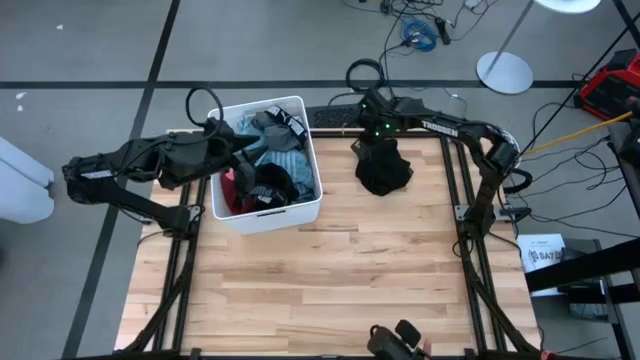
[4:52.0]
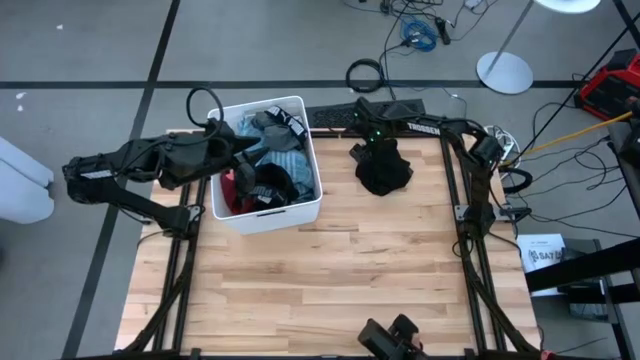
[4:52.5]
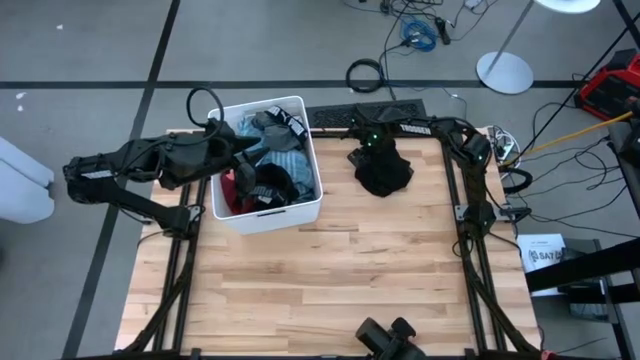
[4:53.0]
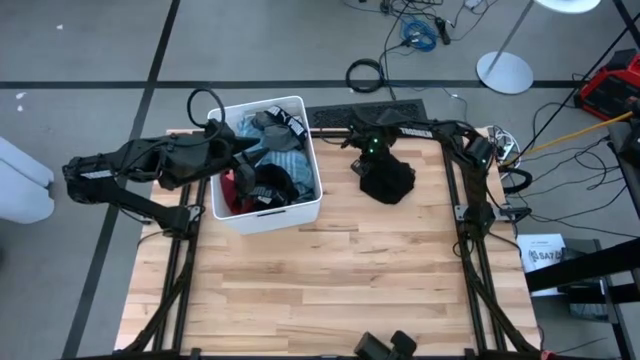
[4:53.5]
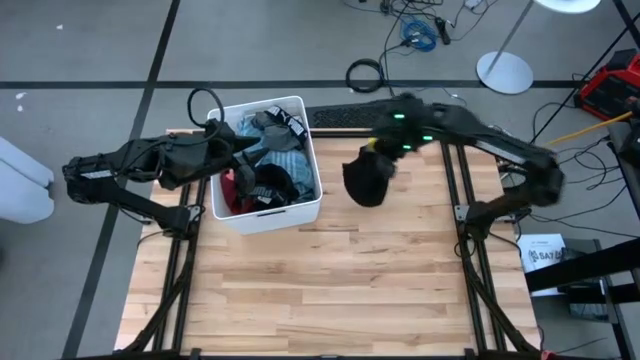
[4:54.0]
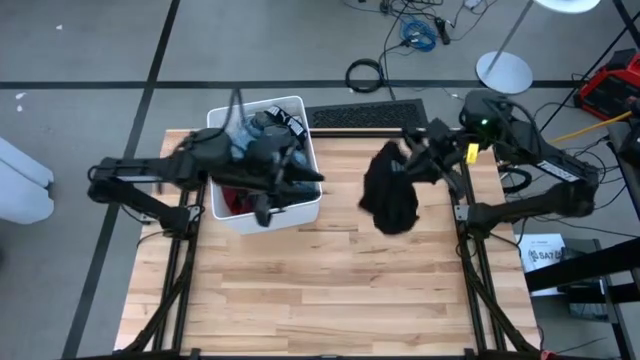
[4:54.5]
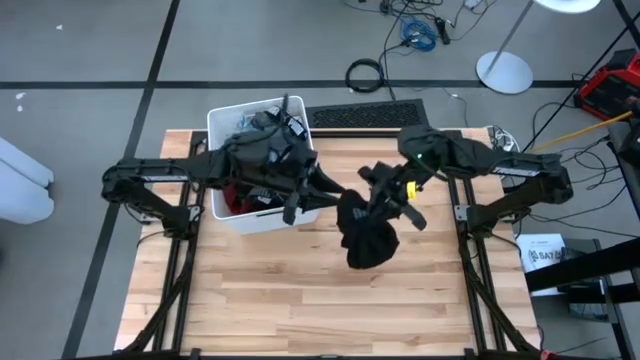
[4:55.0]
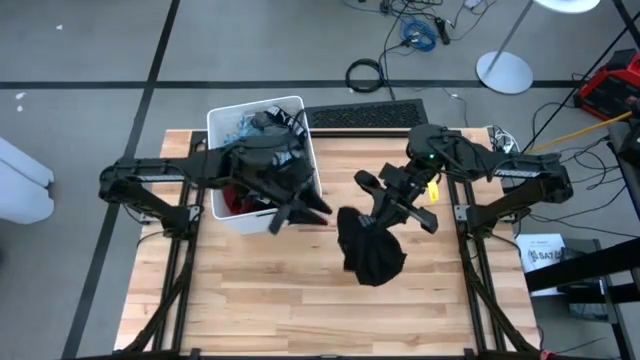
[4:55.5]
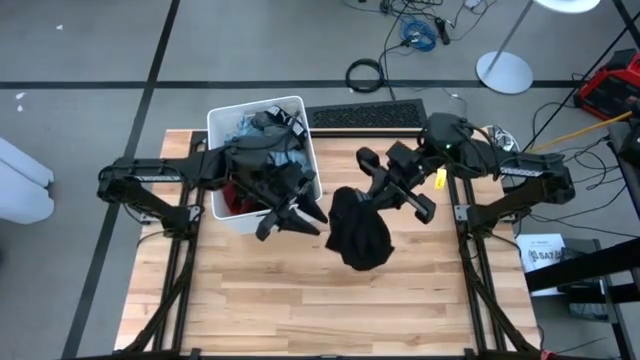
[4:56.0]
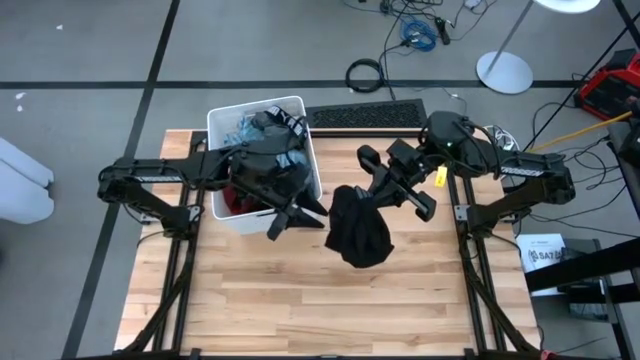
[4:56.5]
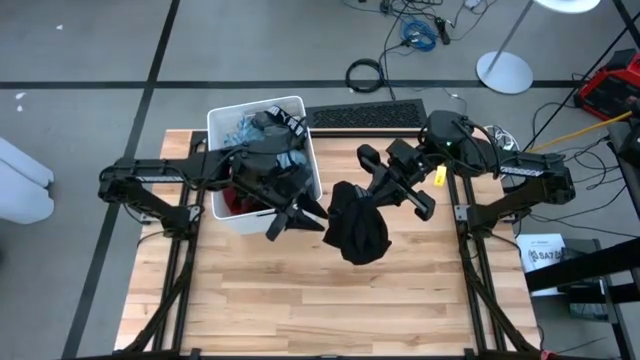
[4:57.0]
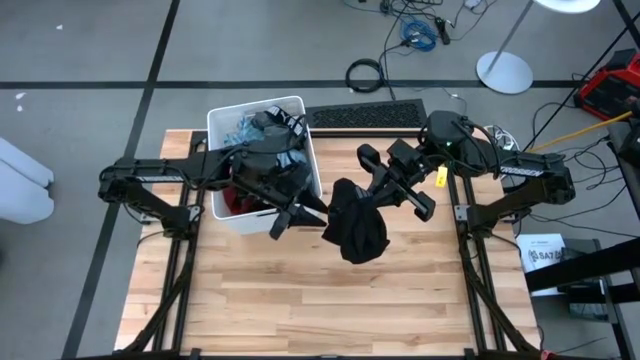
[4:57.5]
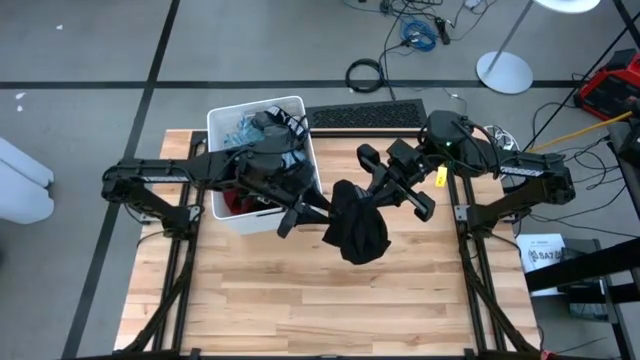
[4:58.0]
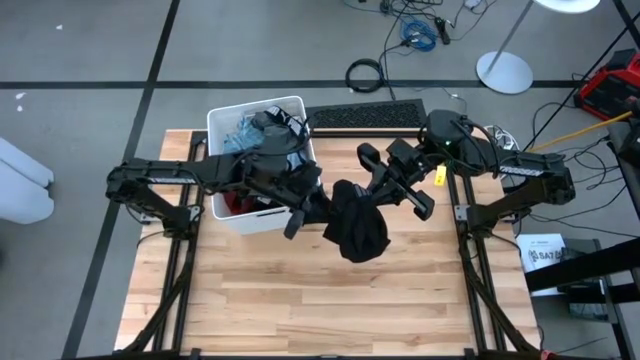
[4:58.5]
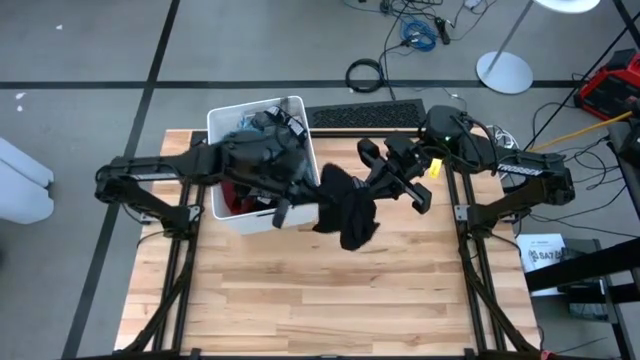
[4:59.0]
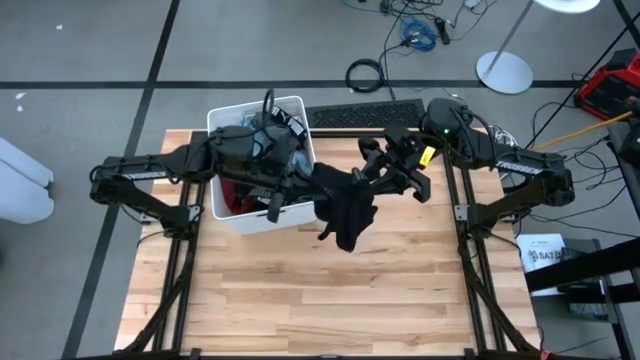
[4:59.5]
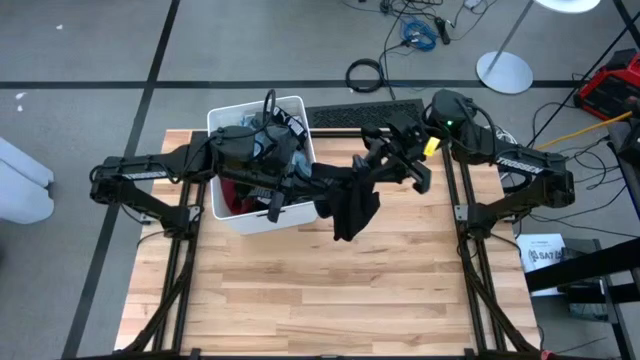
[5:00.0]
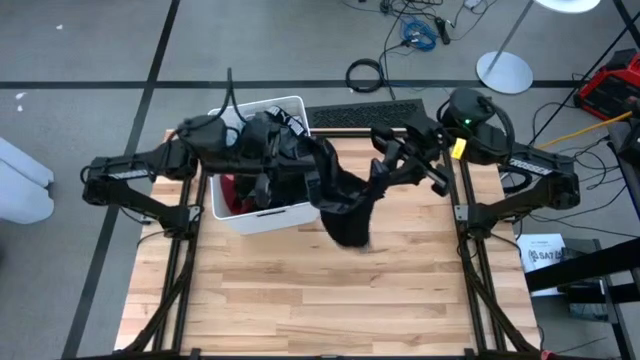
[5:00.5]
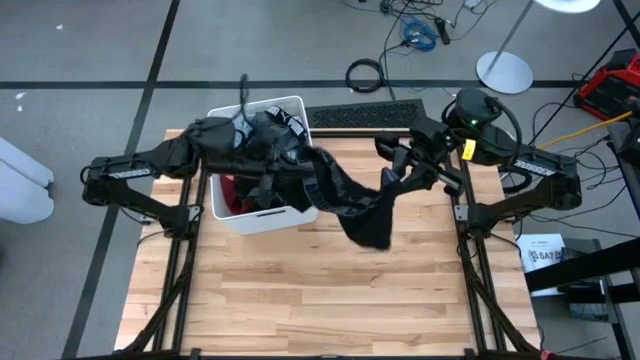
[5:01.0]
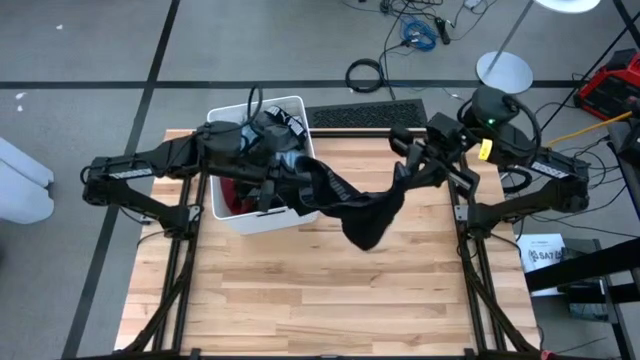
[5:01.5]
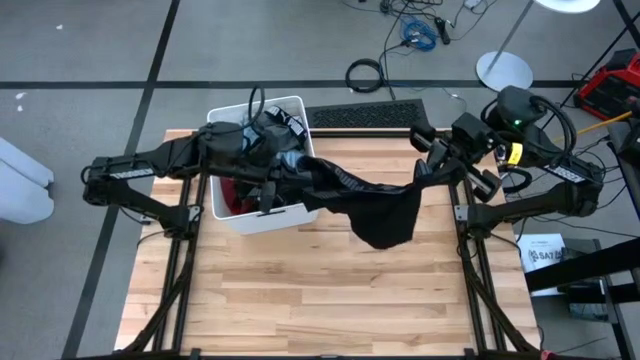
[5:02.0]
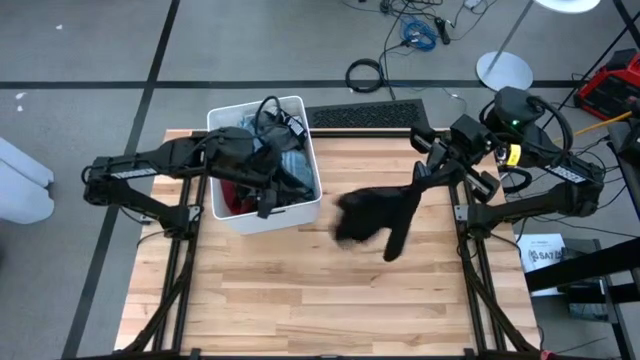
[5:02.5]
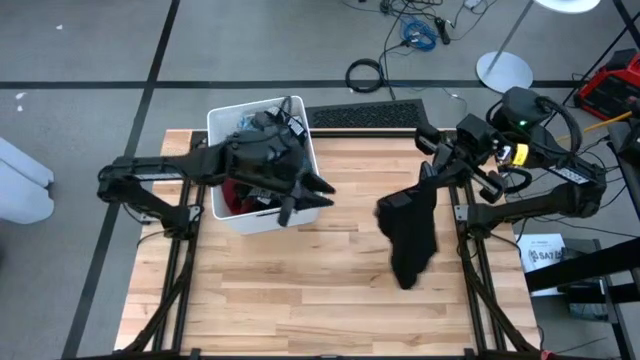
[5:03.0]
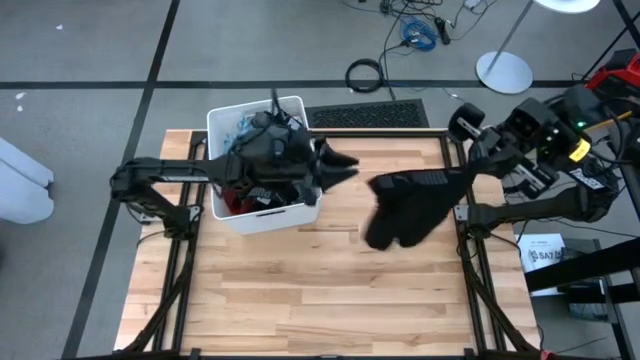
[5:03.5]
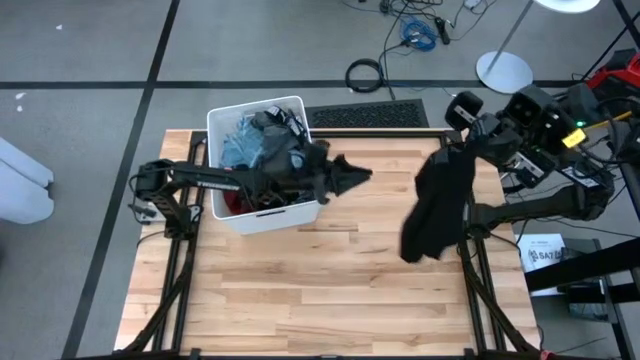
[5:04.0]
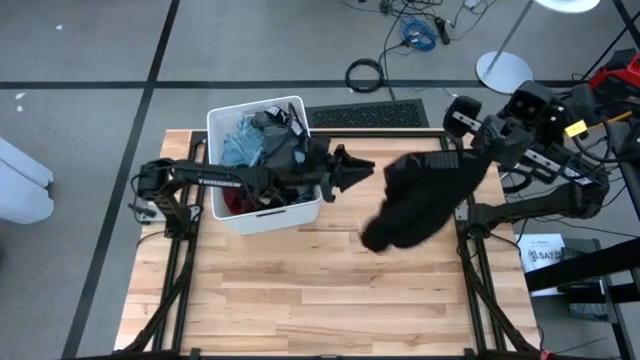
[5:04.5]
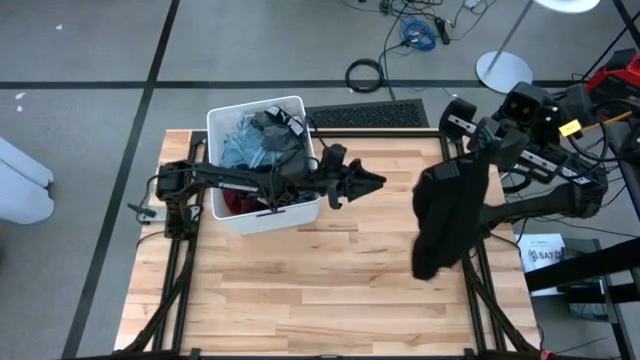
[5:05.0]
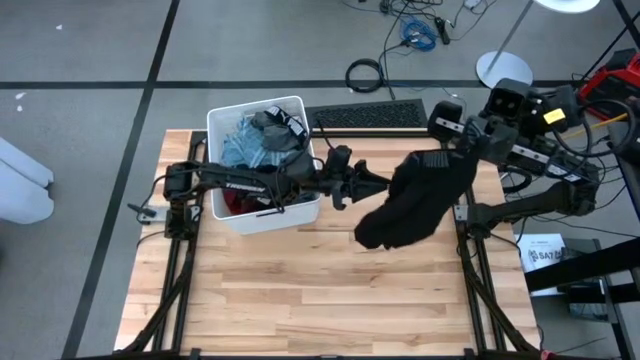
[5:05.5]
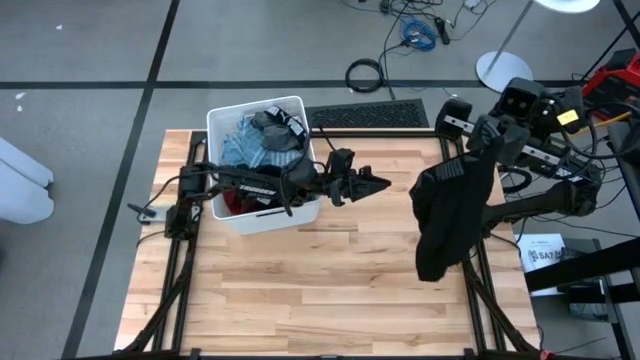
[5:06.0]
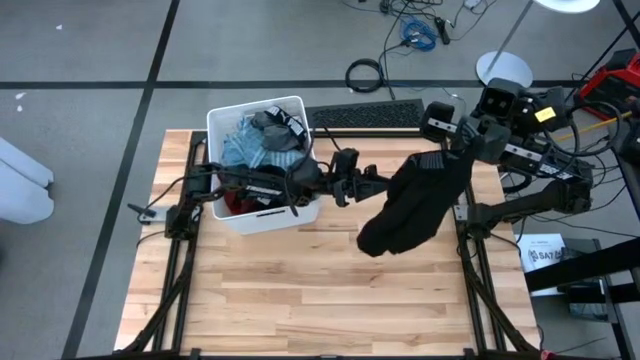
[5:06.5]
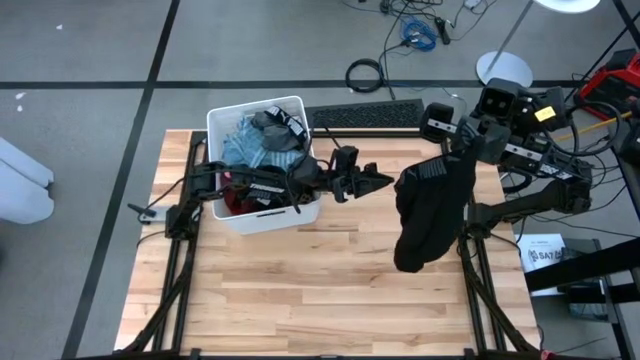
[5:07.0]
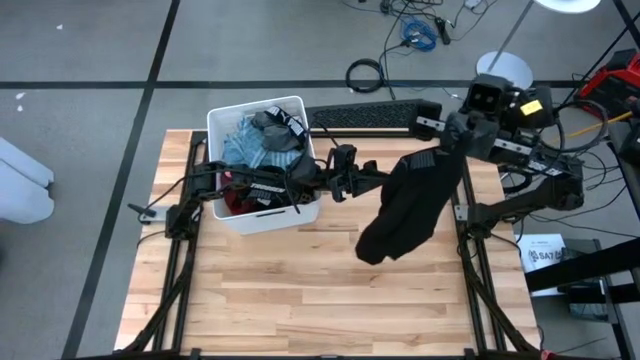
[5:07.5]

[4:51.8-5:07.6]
Task: Sort clothes
Put the black shorts into the white laundry organizer

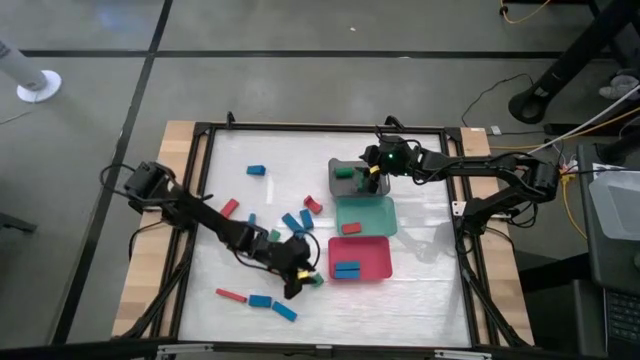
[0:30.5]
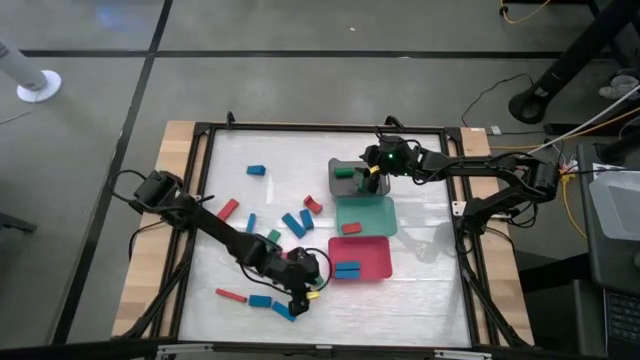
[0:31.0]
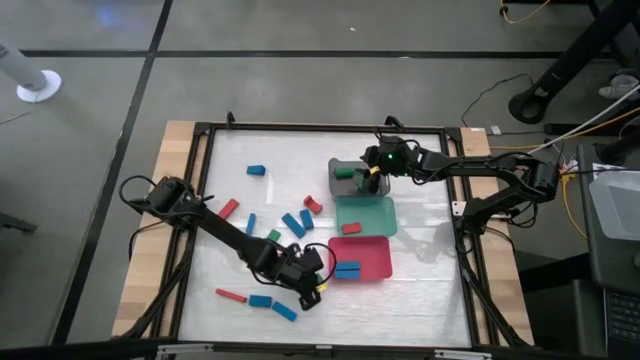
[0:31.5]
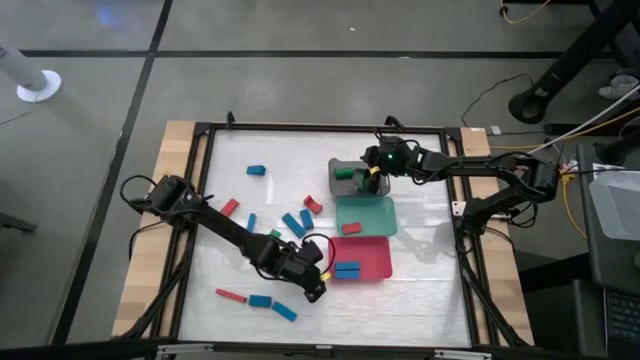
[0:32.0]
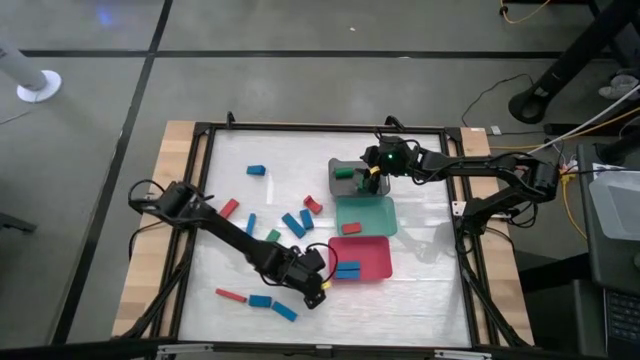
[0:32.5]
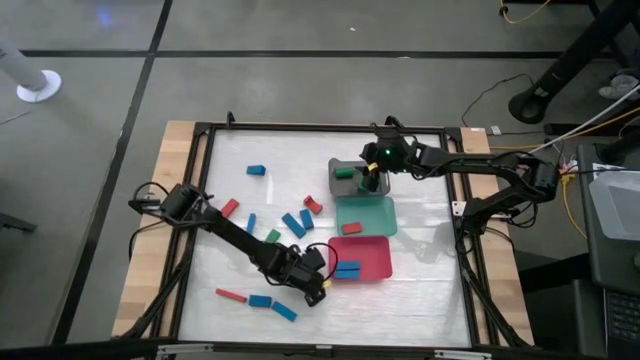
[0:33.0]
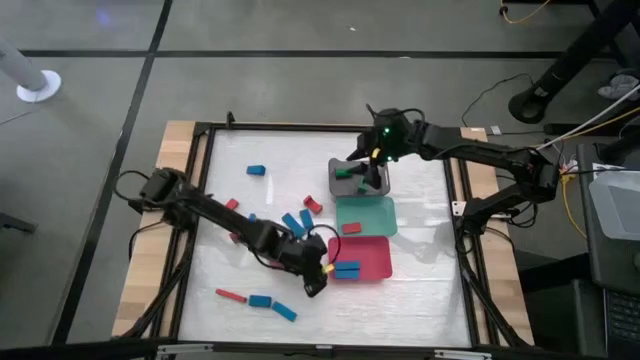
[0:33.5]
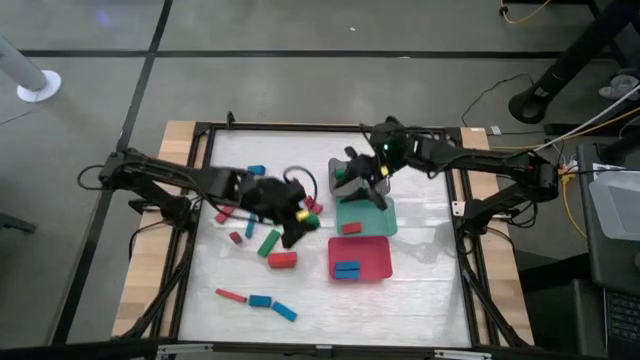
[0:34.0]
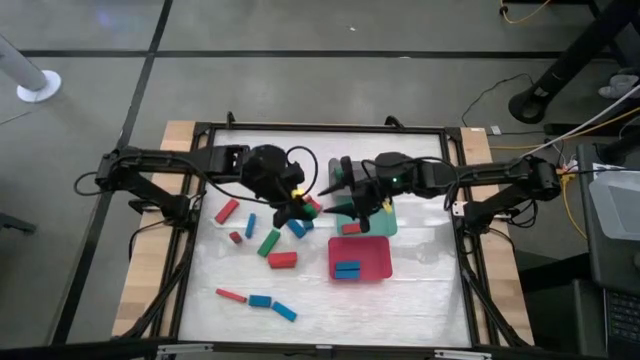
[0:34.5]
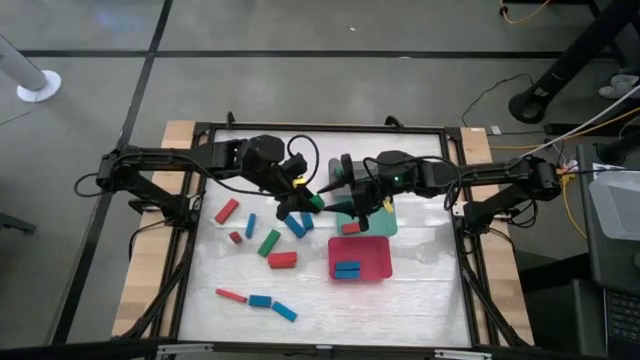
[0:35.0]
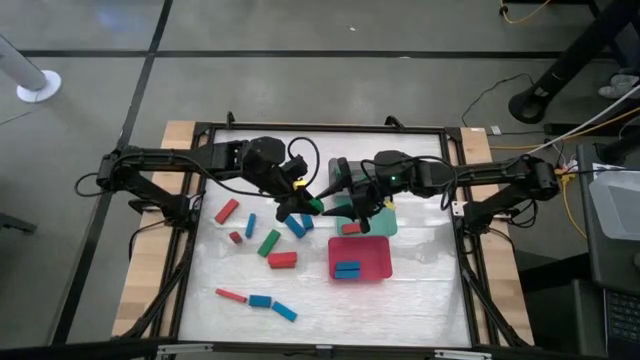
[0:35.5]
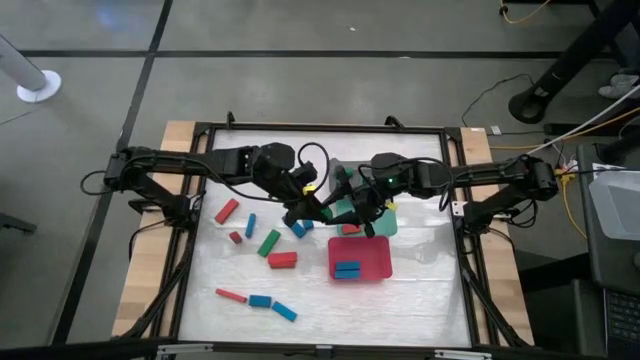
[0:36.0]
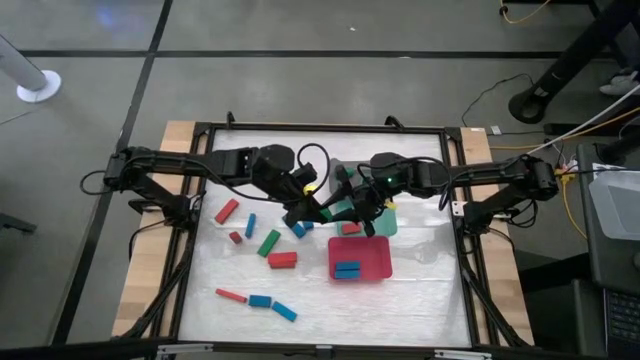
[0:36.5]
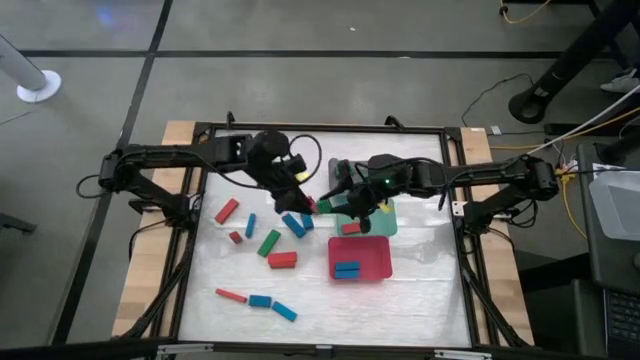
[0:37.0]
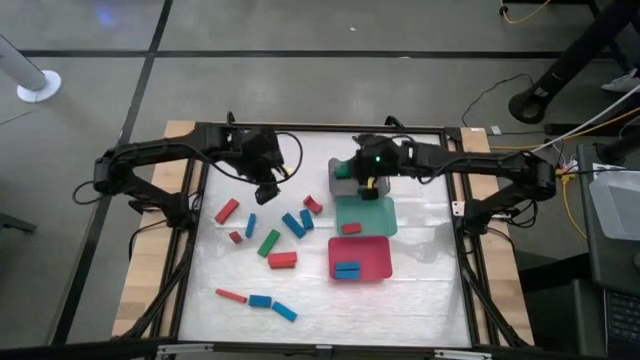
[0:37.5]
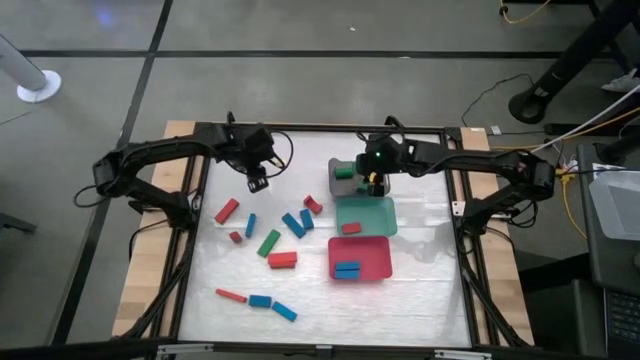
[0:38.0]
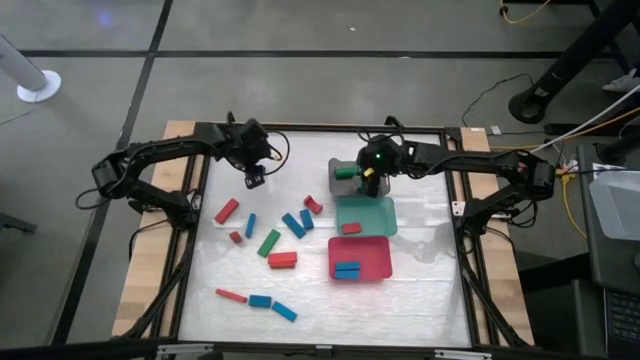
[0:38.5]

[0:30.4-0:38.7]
Task: Sort blocks
Put the green block into the black bin
